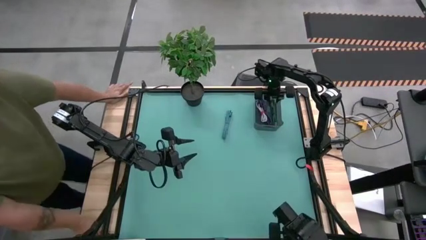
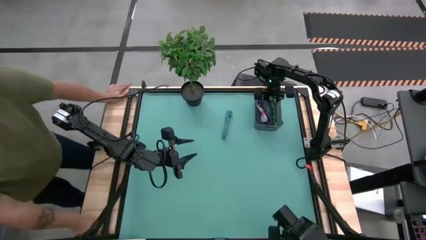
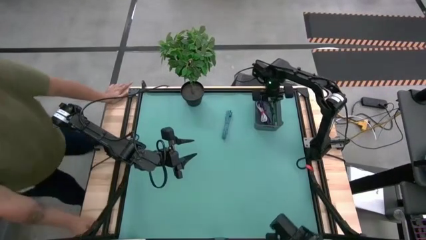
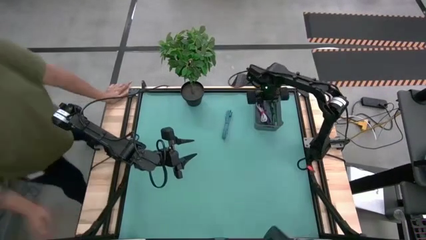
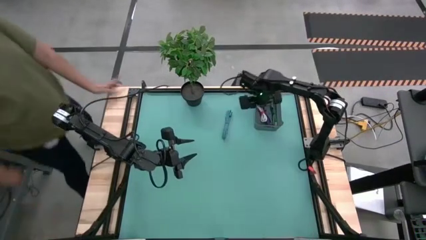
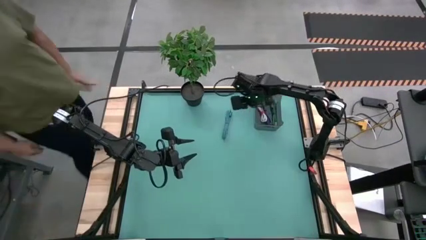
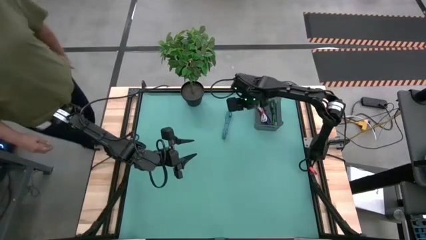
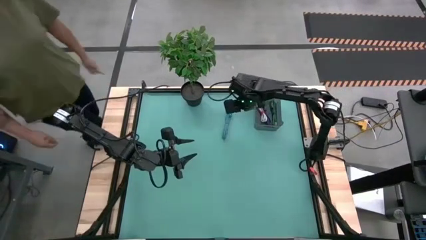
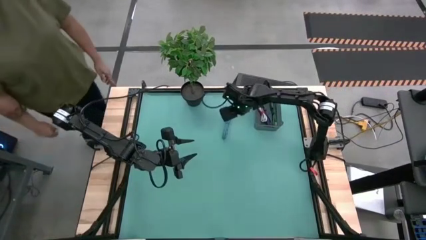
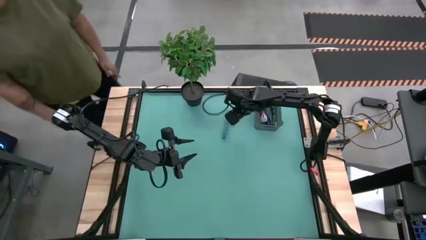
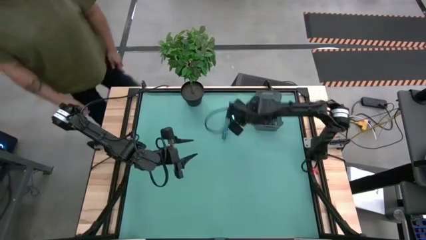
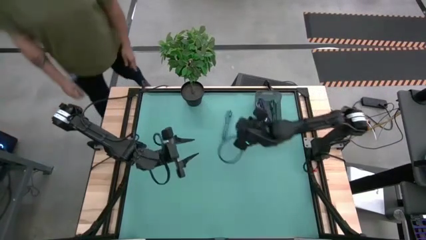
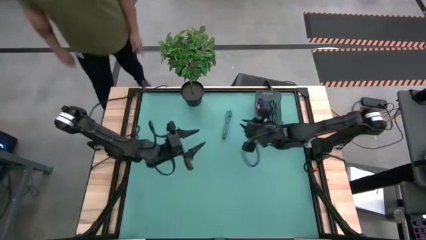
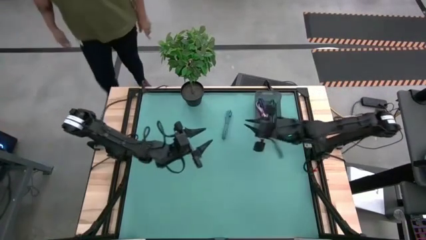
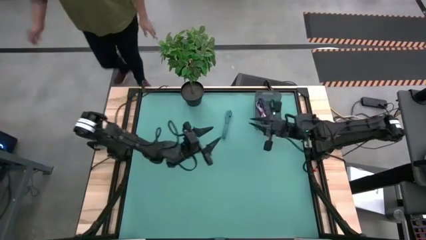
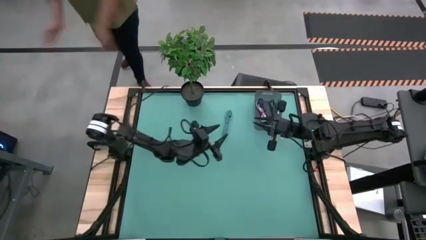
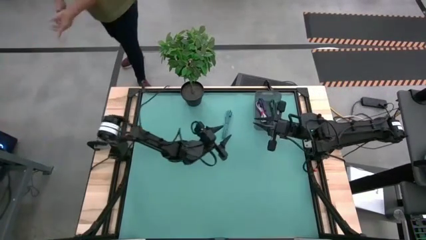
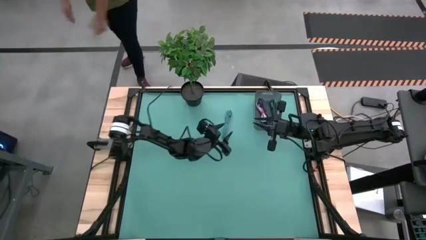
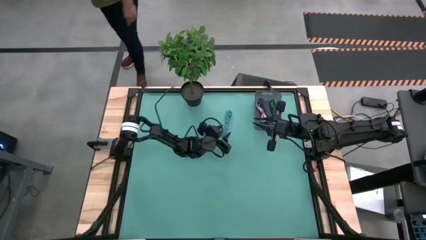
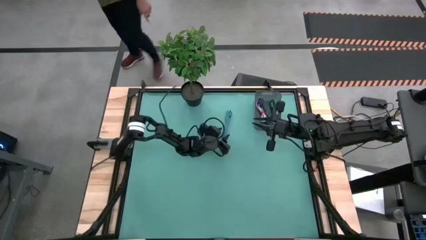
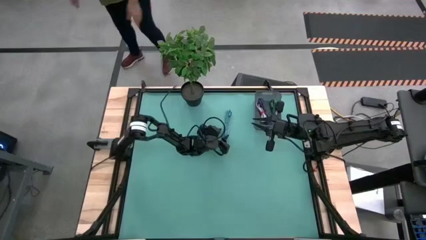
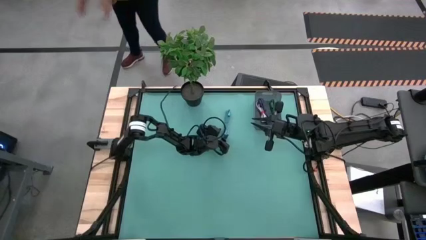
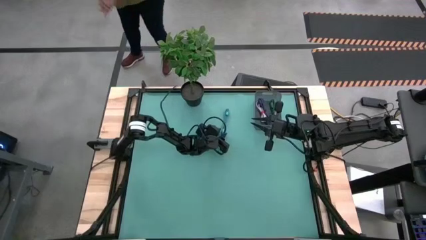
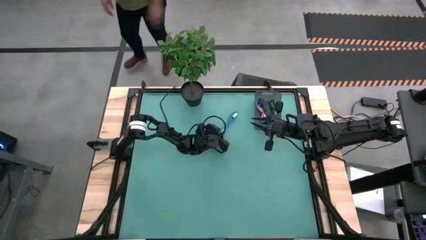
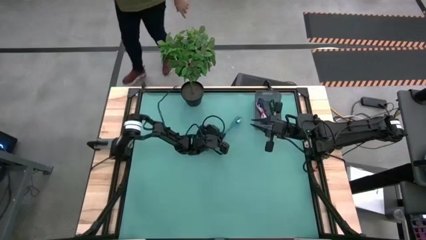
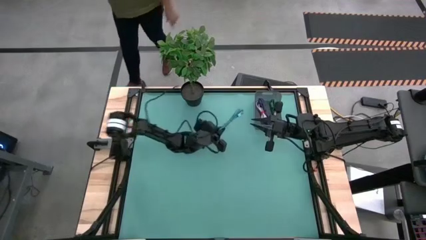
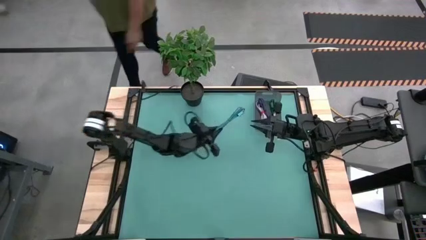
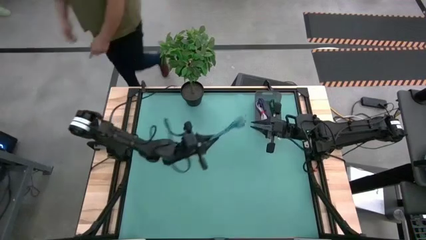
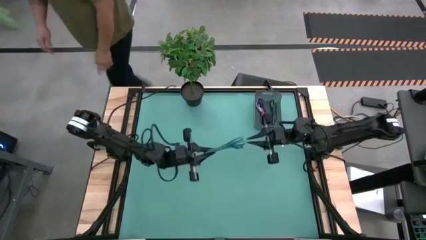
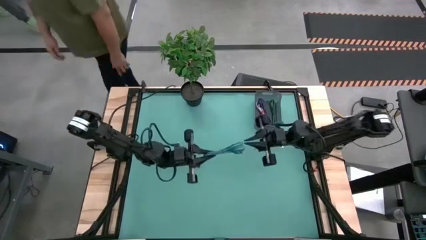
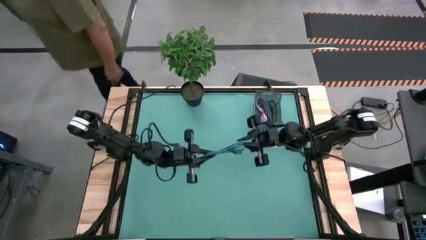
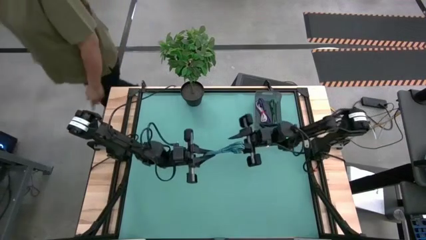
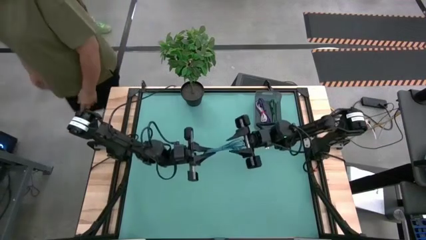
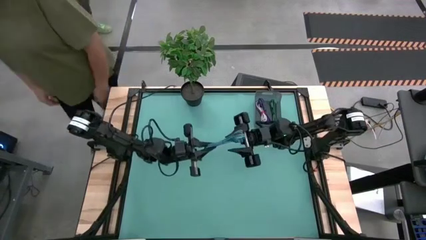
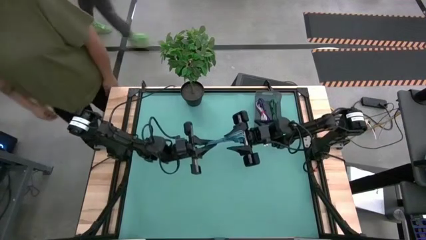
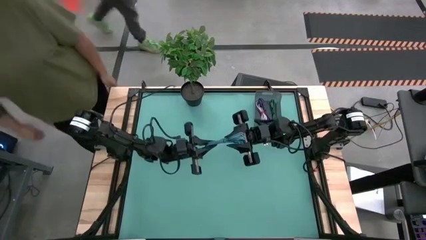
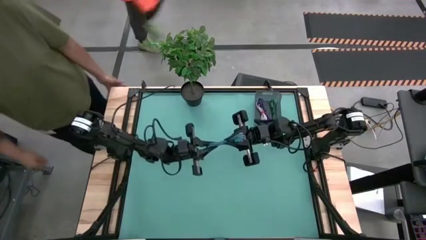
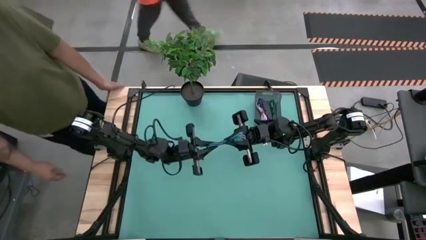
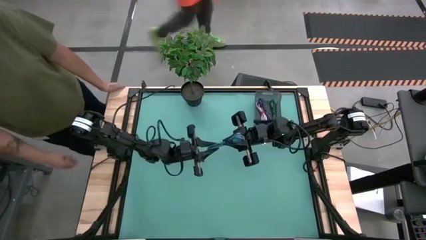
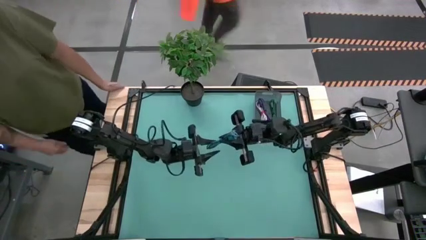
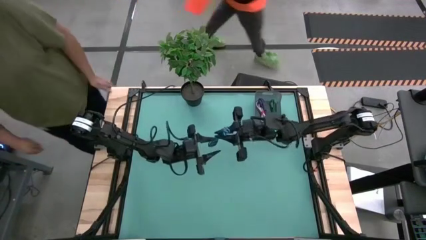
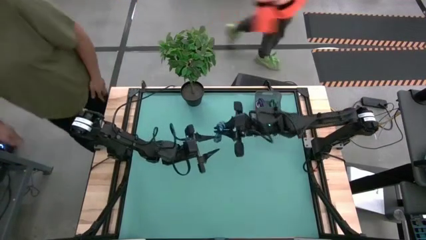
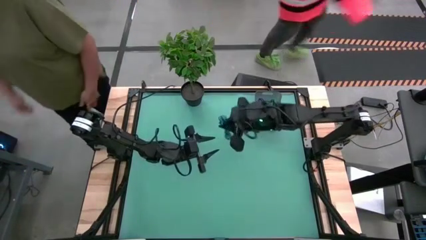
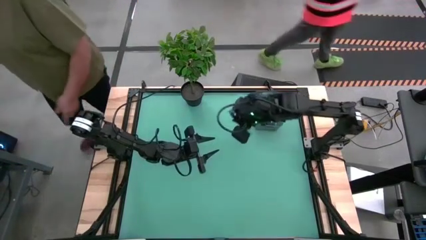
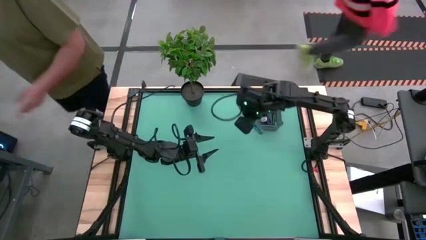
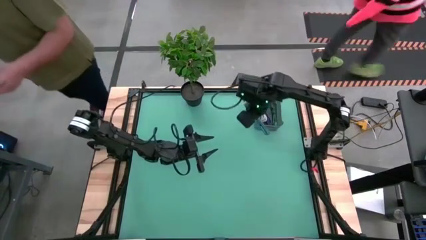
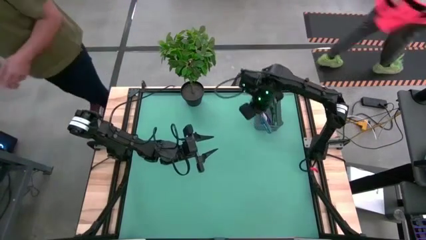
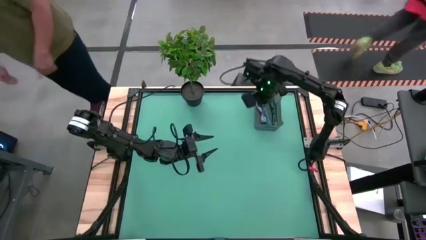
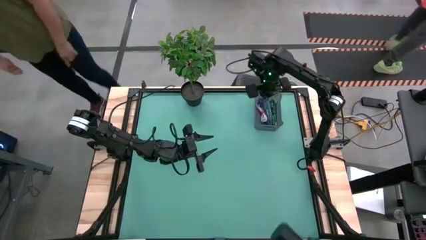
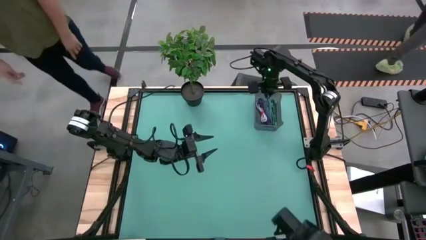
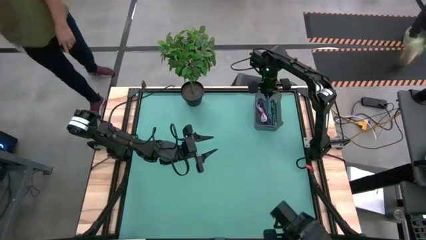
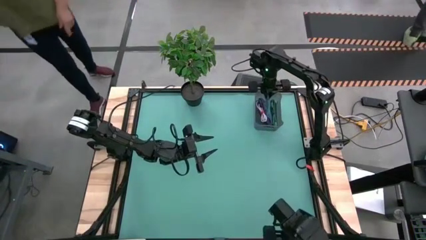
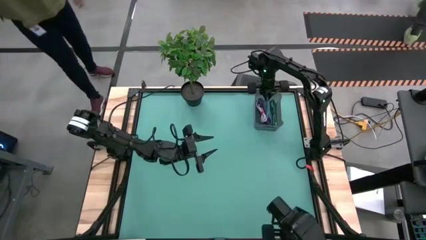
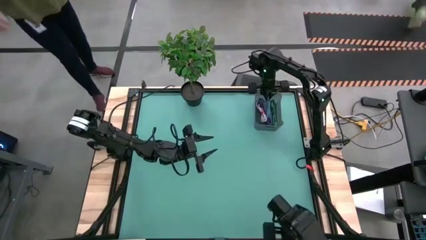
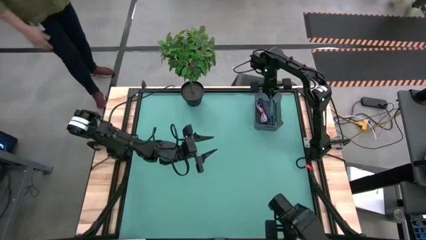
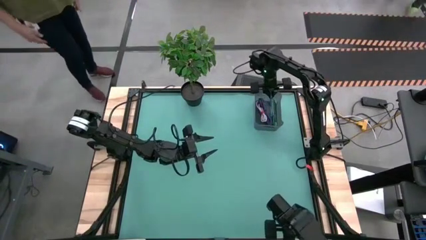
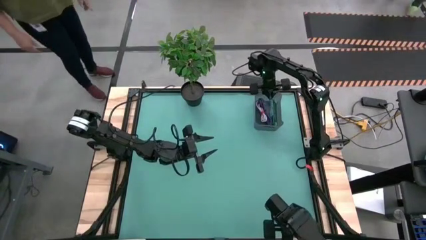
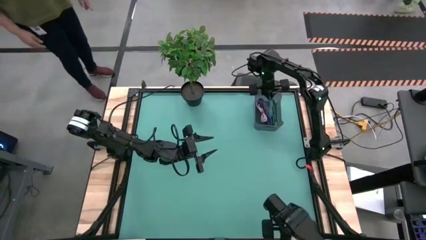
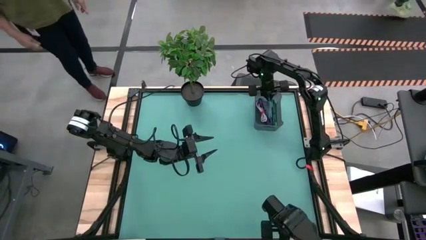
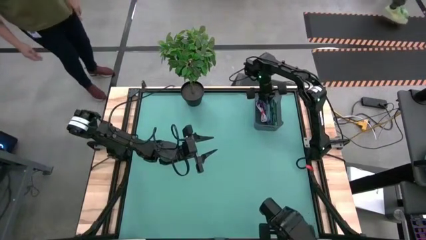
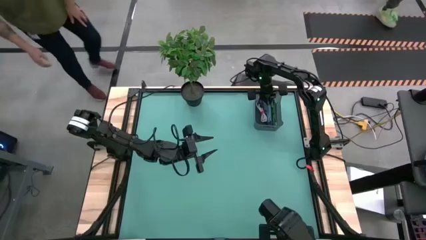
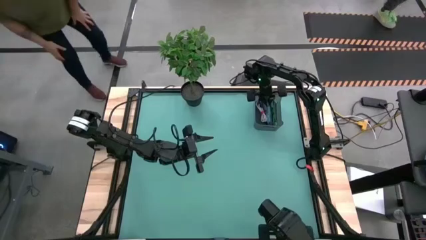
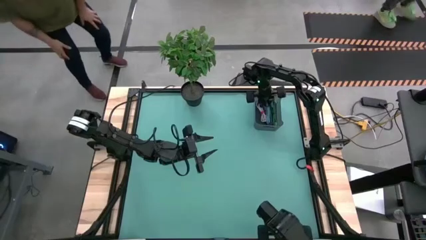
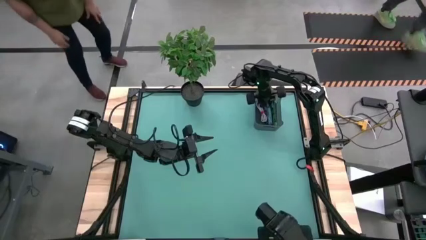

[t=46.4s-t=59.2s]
Task: Pick and place USB-C Cables
Put the blue charger cable into the black bin

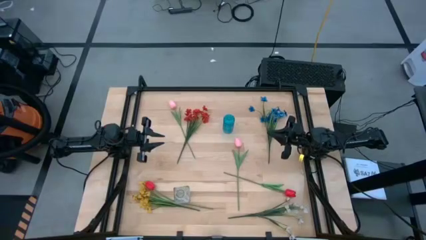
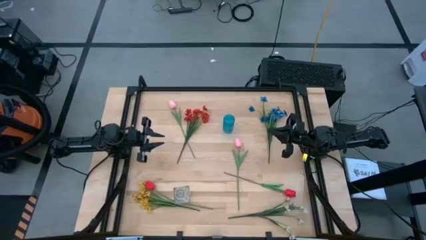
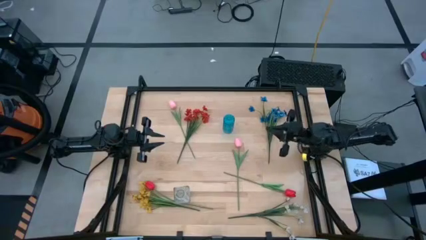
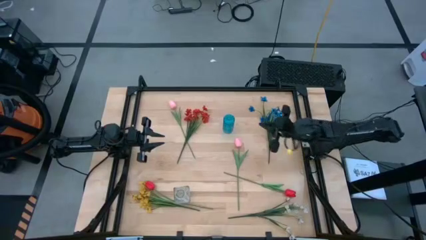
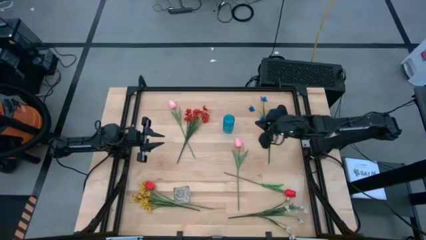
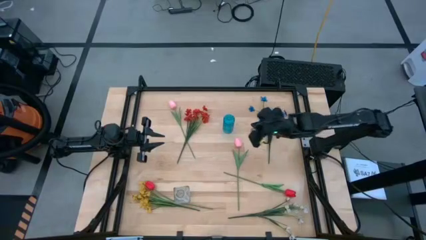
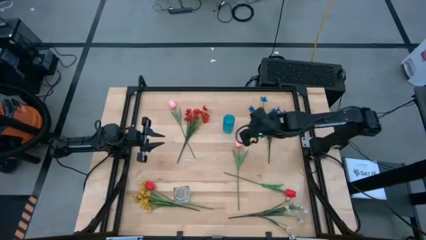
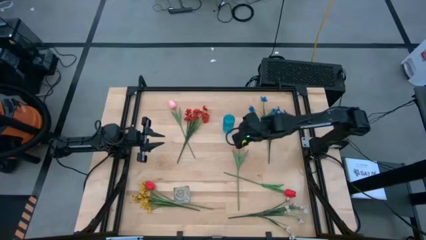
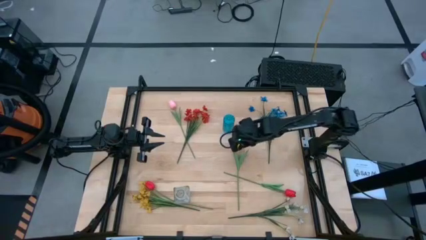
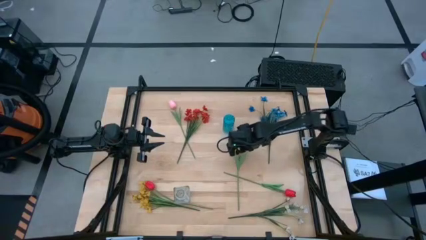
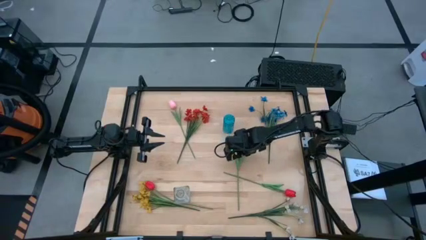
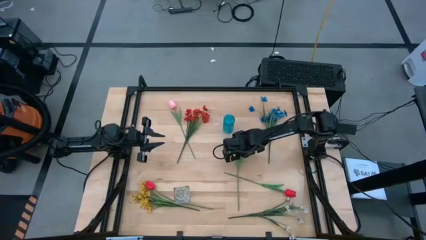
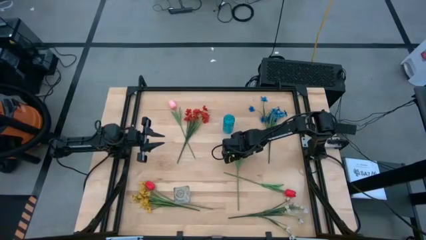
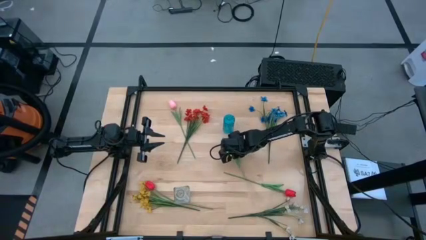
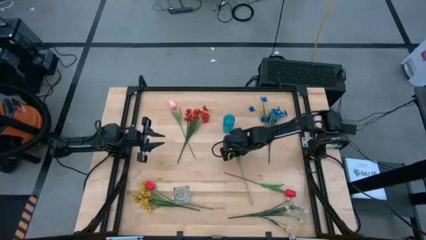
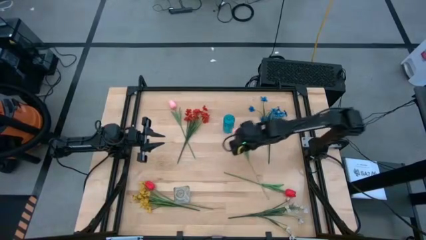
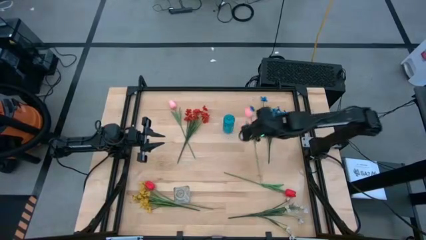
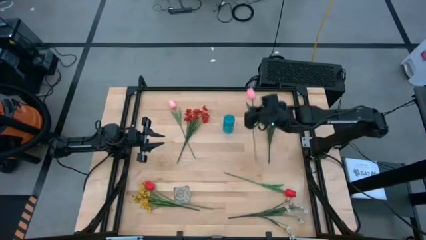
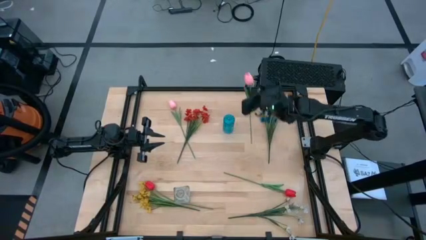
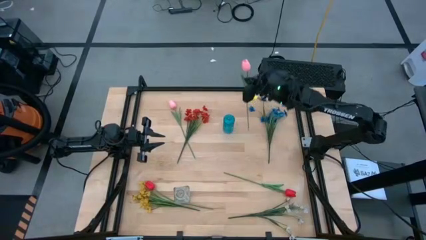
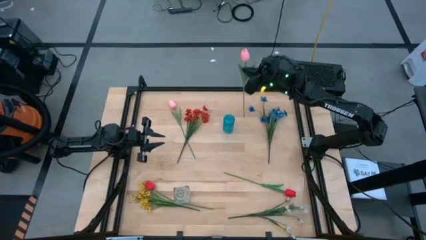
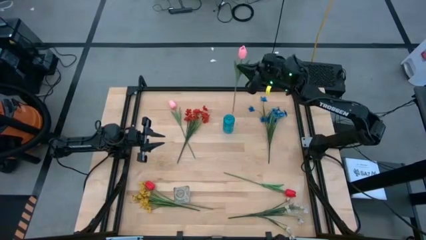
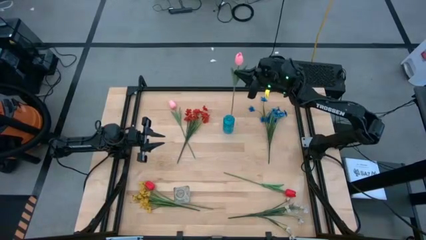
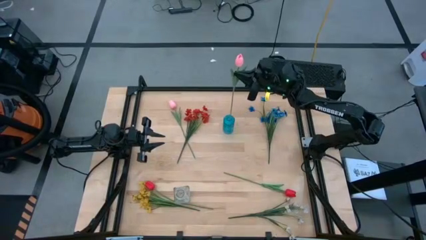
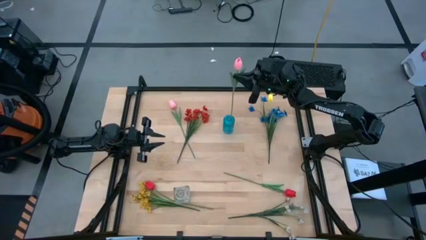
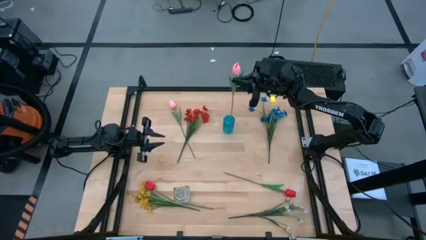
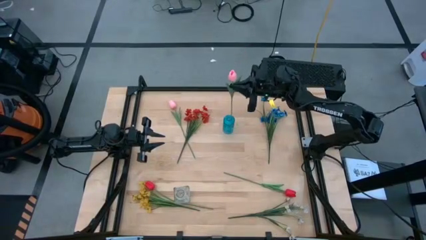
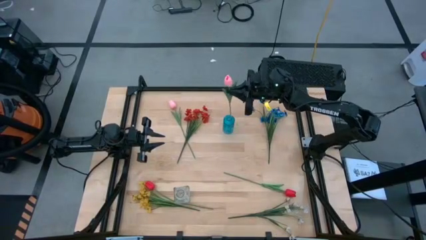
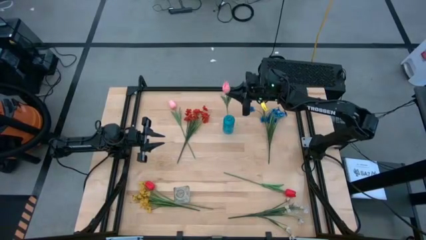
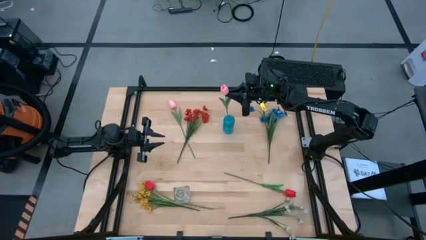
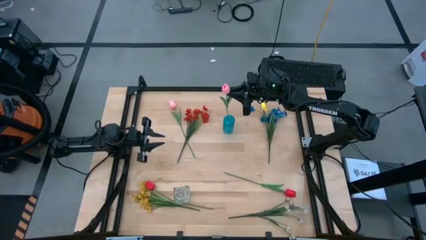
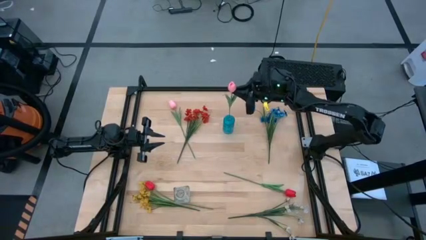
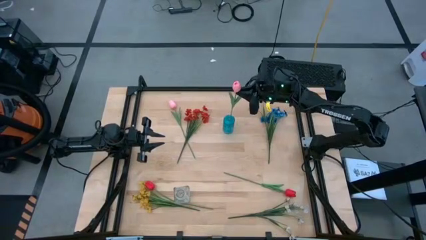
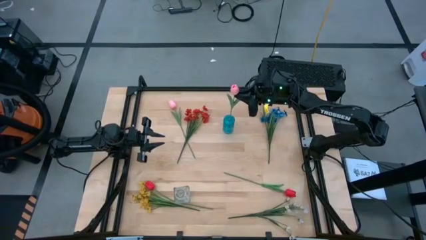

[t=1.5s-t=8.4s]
Task: Sort flowers into vase by color
Put the right pink tulip into the blue vase
